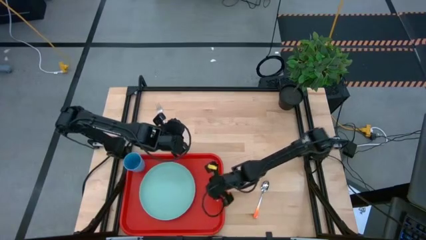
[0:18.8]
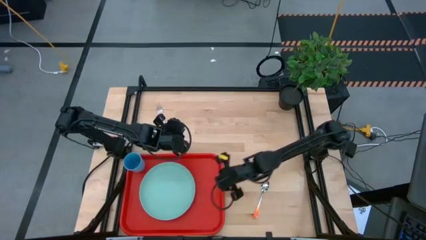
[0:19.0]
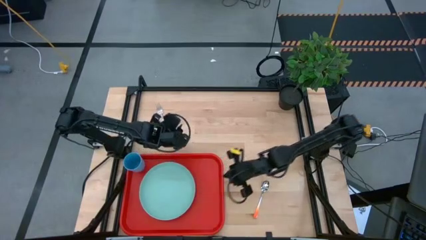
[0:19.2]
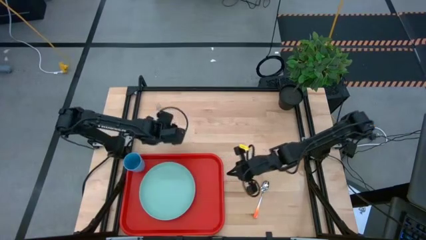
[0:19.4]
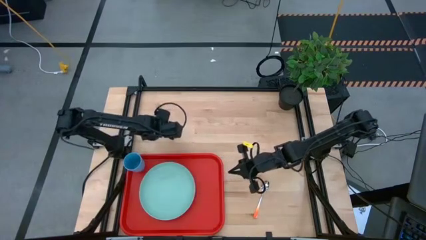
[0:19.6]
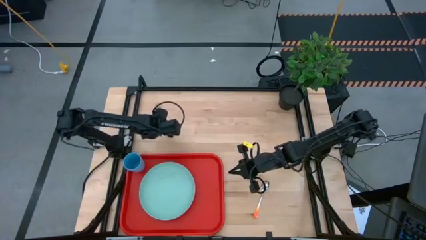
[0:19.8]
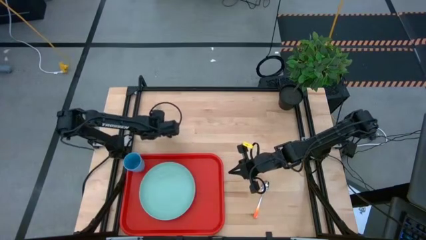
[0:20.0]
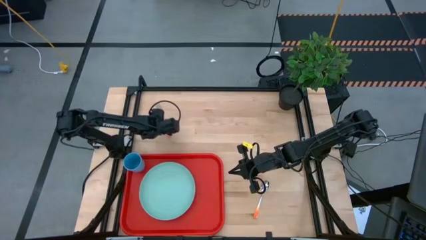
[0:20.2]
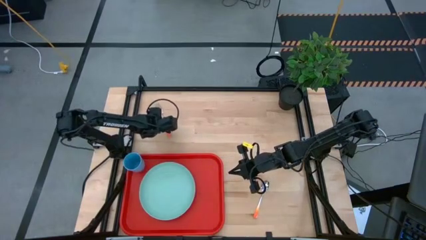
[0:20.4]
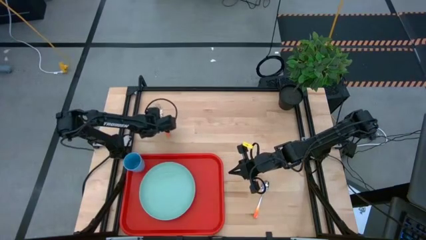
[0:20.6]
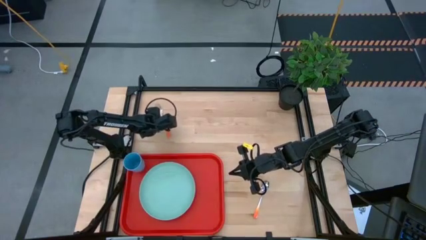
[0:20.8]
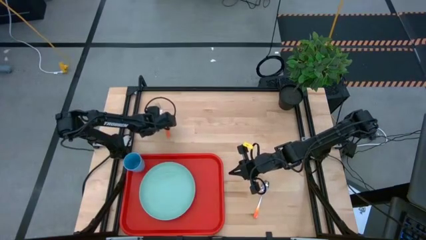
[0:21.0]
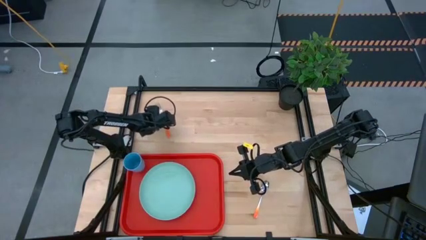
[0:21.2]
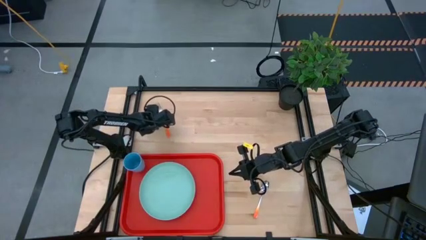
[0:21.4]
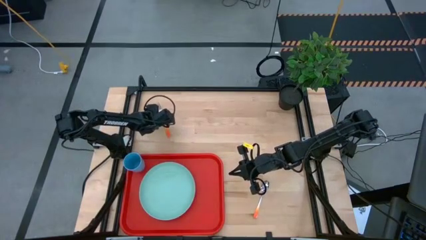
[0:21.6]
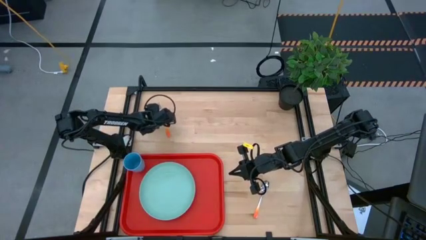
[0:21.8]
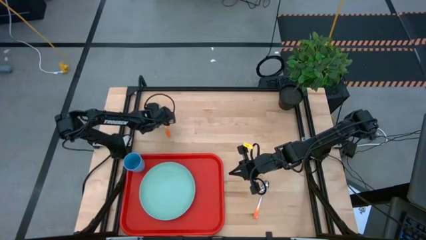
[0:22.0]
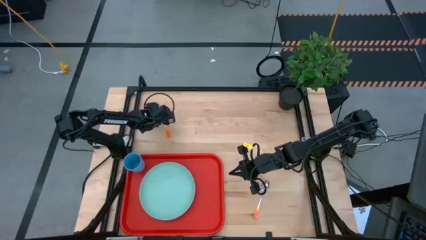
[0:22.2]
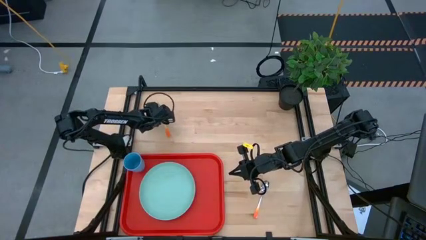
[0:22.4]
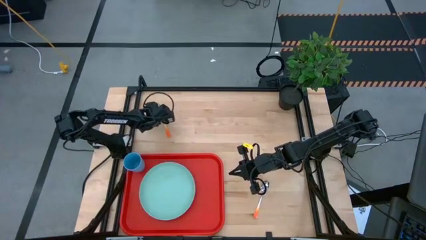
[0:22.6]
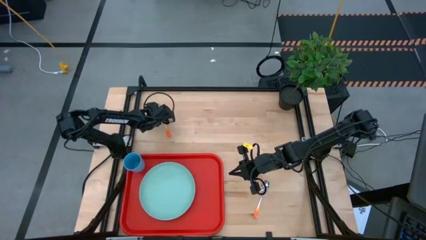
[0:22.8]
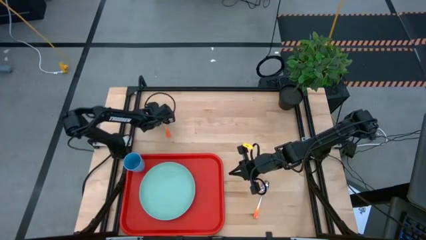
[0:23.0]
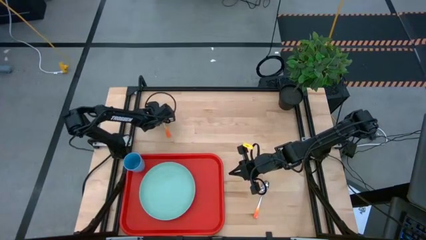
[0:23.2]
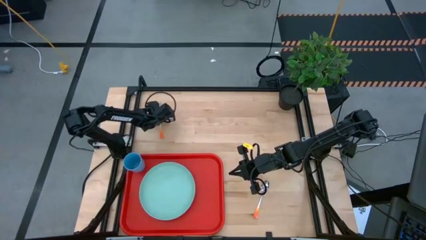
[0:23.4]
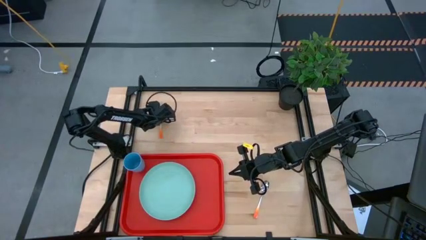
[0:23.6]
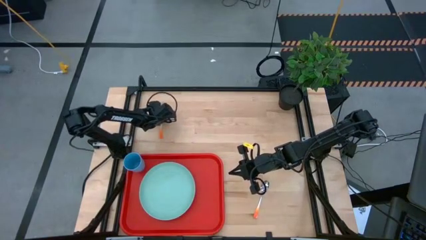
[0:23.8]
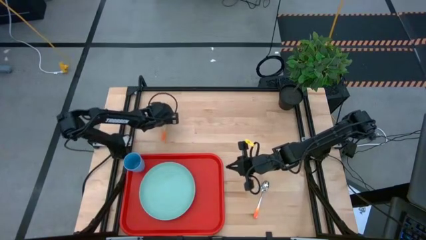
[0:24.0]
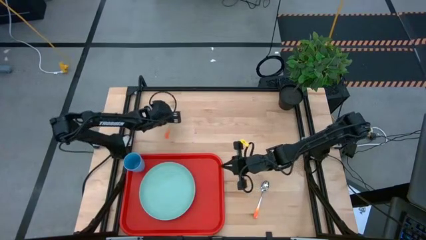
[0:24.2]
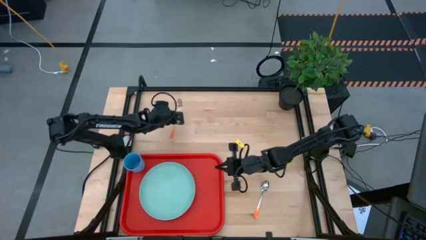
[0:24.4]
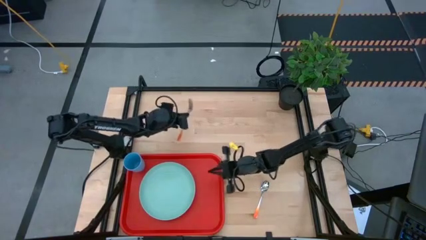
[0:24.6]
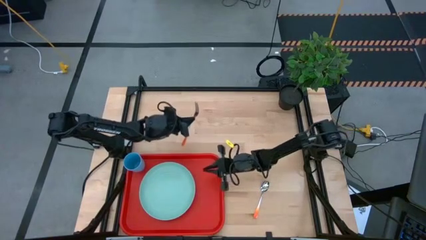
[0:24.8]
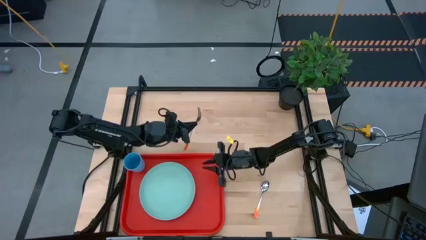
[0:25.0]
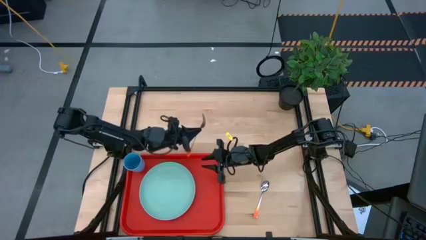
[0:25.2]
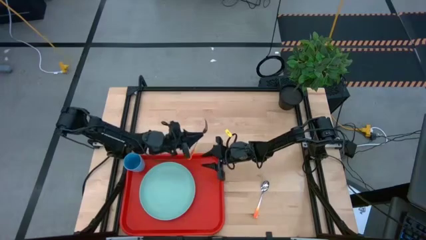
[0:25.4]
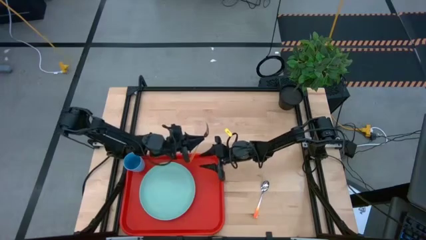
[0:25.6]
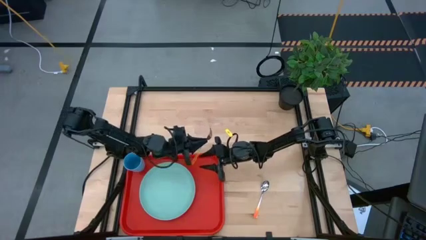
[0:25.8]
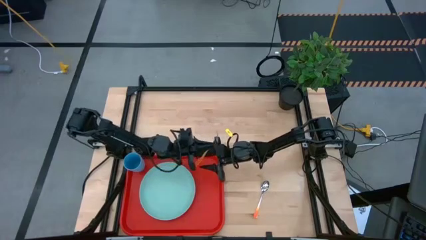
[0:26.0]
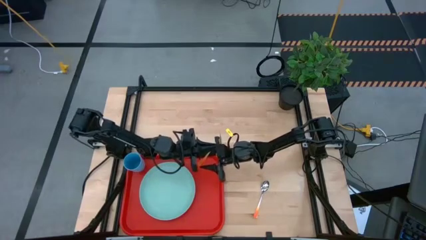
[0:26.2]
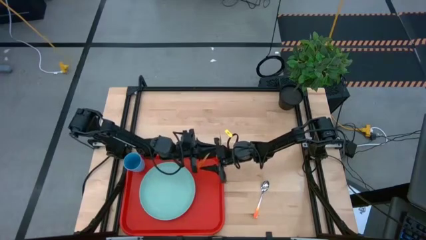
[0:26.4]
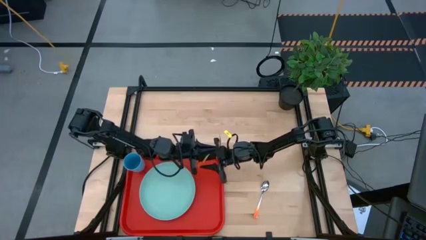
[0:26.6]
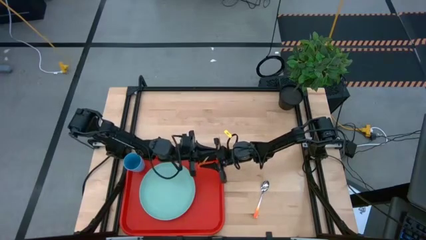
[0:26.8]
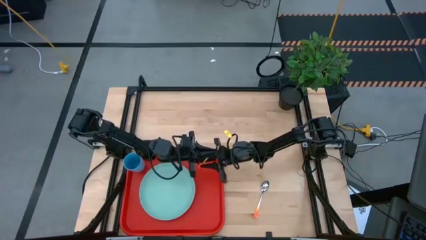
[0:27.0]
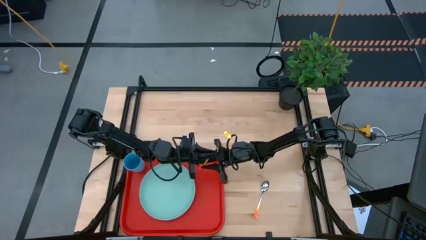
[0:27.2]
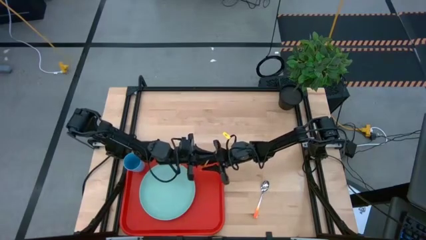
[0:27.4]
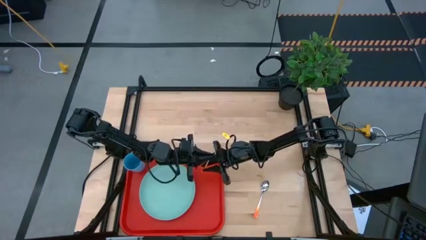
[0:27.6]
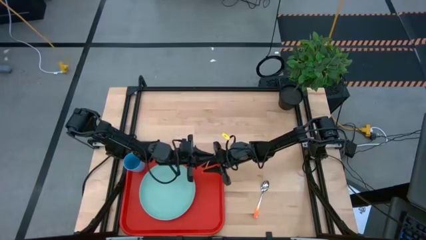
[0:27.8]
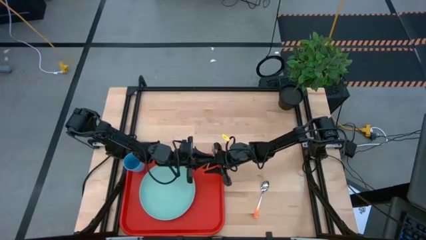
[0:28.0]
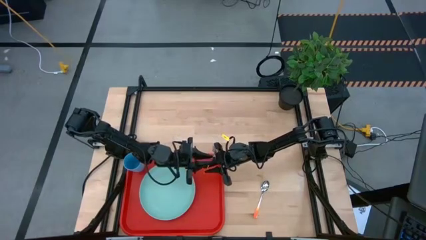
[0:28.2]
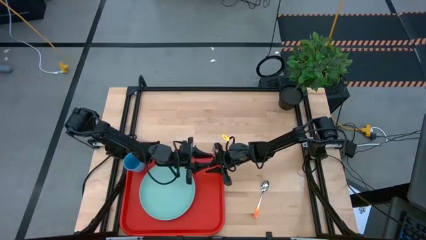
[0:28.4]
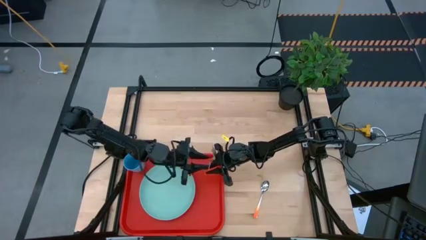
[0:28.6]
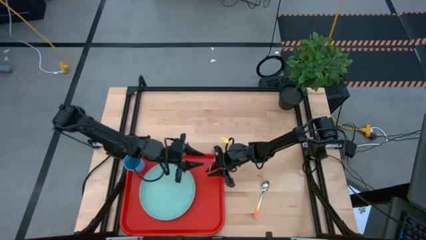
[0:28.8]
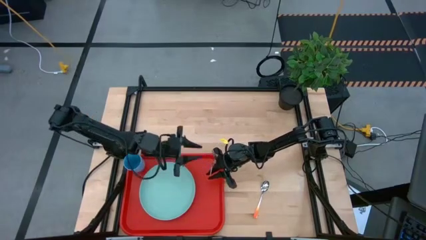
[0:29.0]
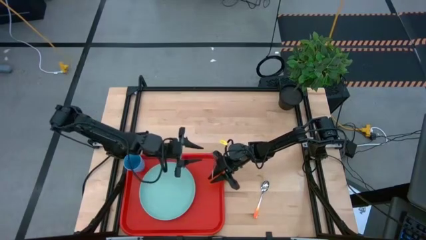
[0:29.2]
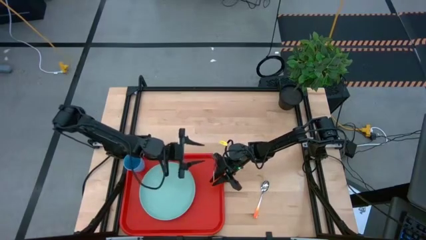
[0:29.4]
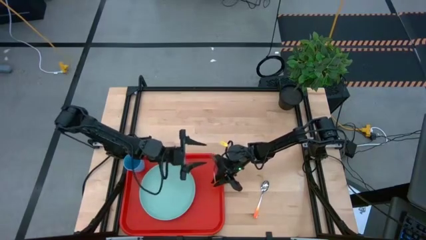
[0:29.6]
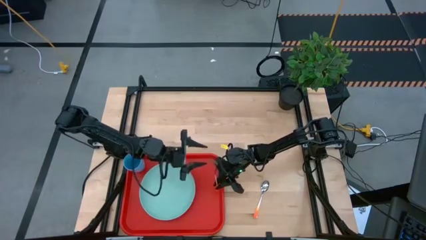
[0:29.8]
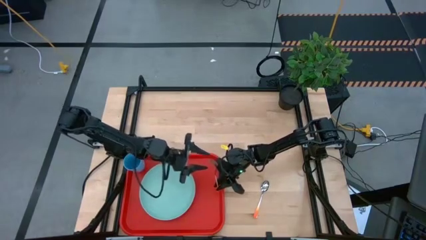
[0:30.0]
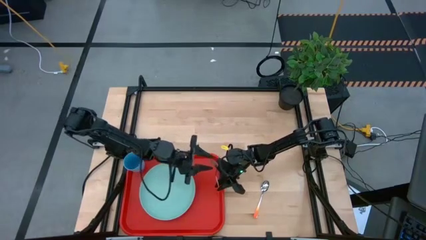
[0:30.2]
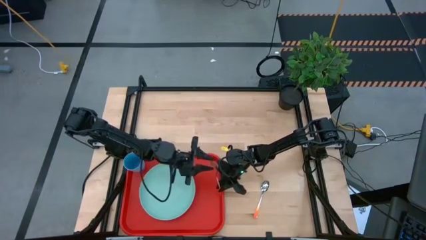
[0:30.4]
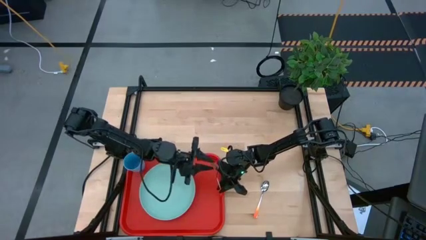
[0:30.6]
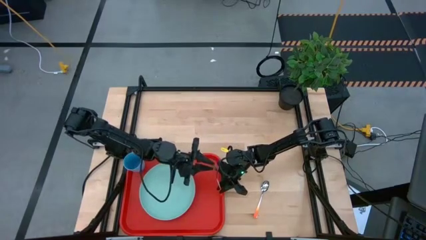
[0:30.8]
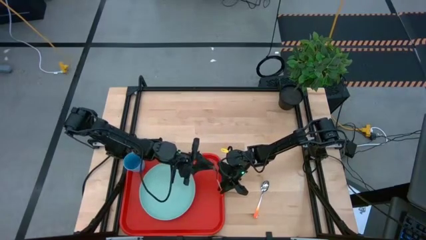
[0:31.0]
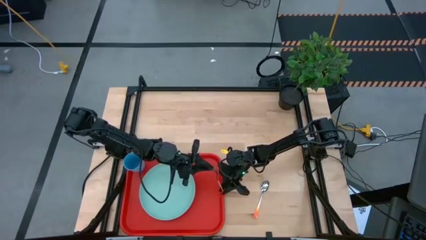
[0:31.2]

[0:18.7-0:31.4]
Task: Pick and place plate/cup/fork/spoon on tray
Put the orange fork on the tray

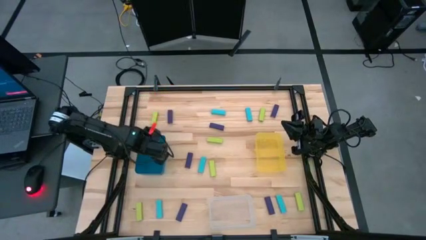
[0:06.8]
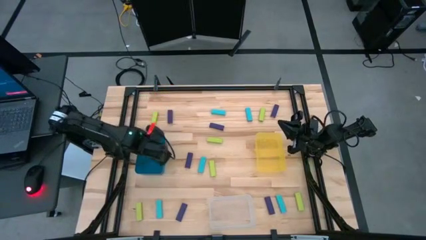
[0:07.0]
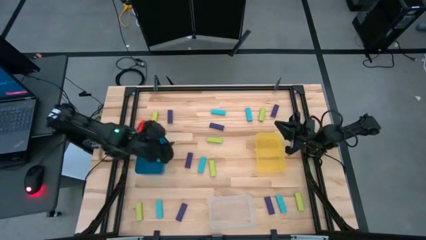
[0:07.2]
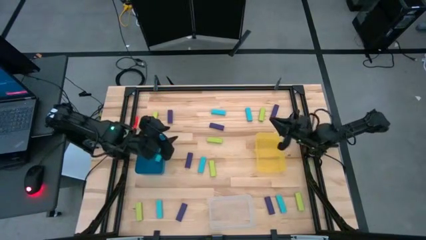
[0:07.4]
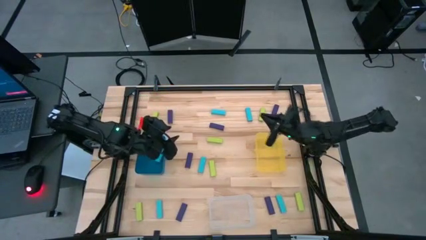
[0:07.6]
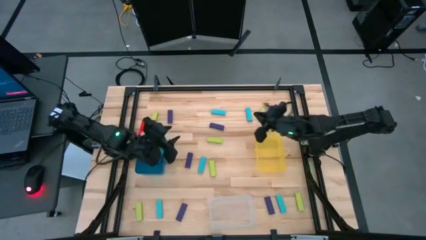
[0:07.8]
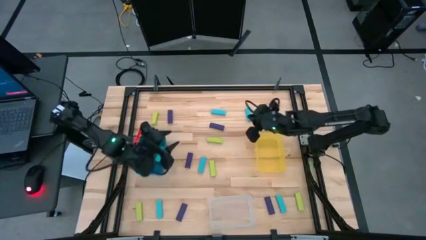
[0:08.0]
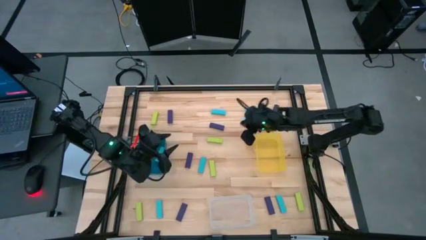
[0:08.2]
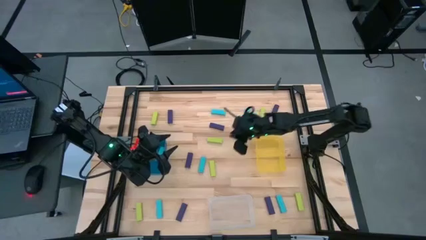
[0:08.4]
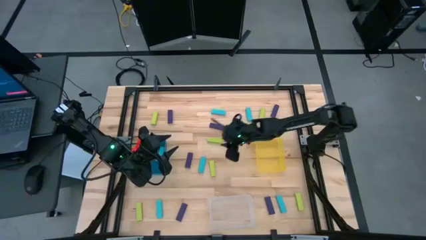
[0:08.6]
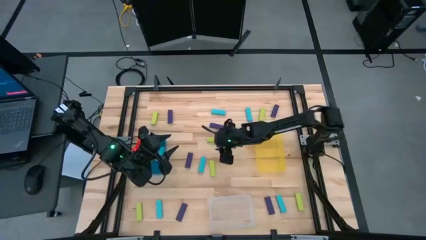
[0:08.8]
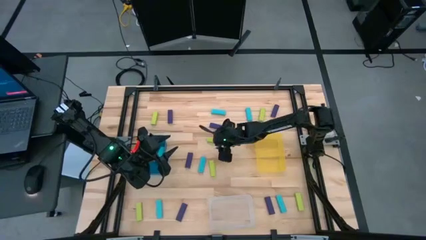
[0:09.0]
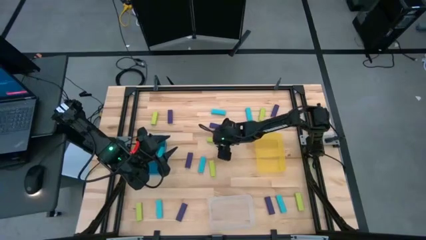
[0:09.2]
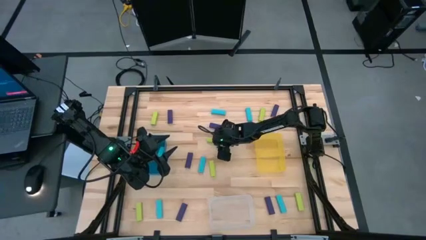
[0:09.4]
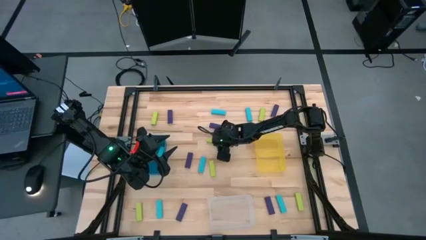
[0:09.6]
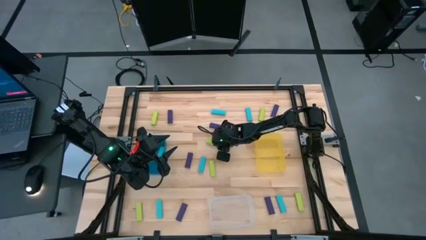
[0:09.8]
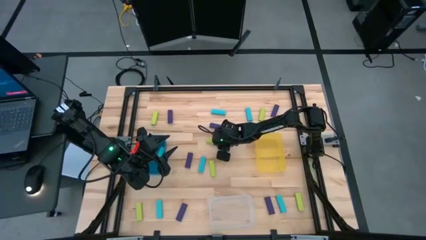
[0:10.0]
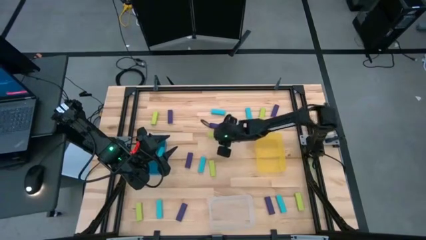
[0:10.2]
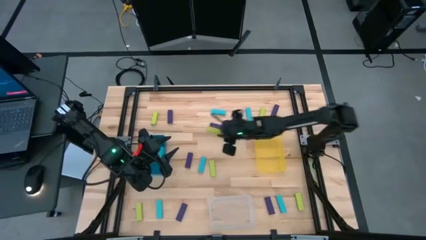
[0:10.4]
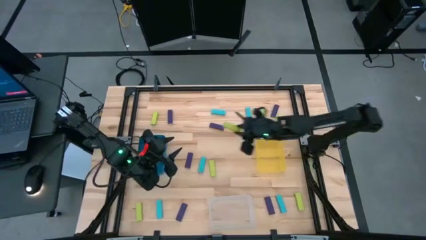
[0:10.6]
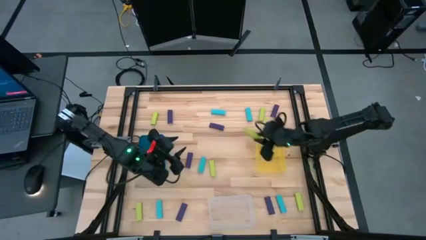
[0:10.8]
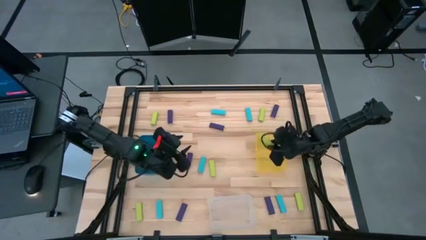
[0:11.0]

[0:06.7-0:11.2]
Task: Sort blocks
Put the green block into the yellow bin
